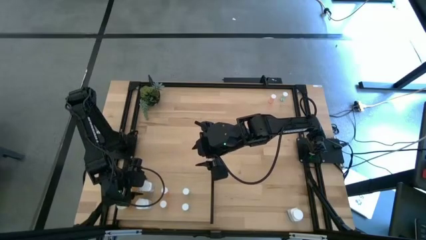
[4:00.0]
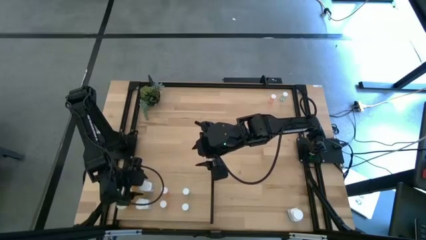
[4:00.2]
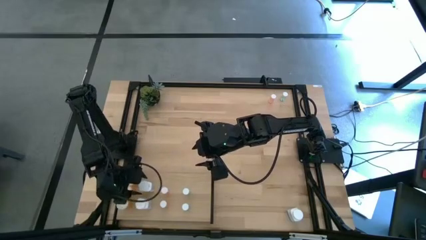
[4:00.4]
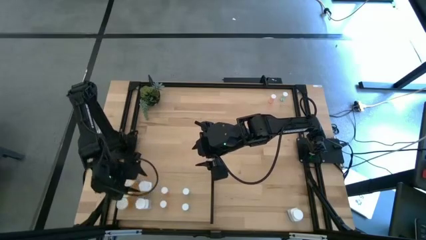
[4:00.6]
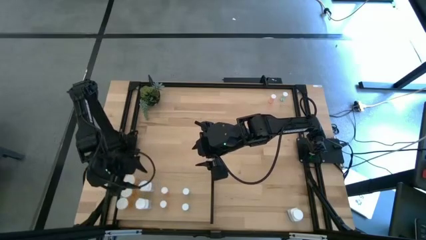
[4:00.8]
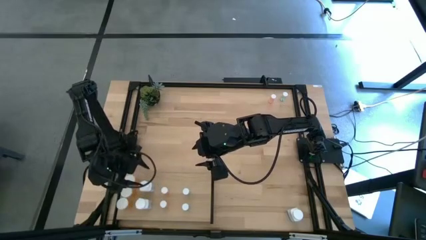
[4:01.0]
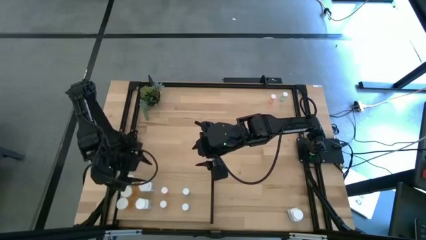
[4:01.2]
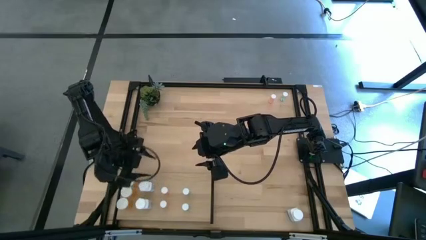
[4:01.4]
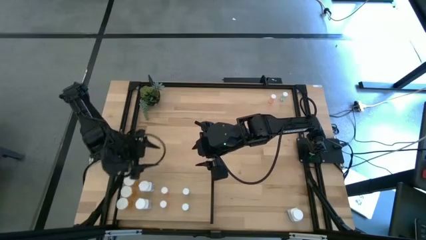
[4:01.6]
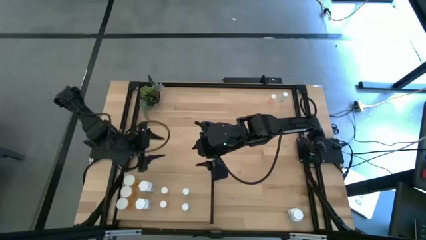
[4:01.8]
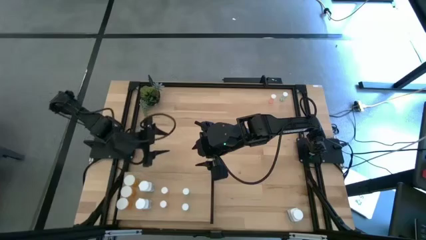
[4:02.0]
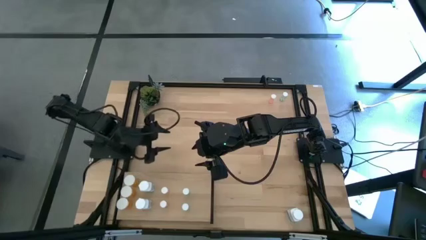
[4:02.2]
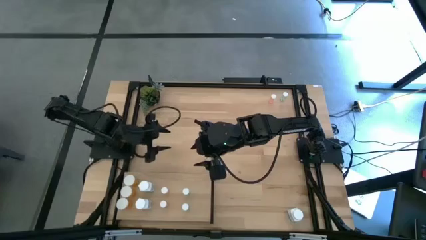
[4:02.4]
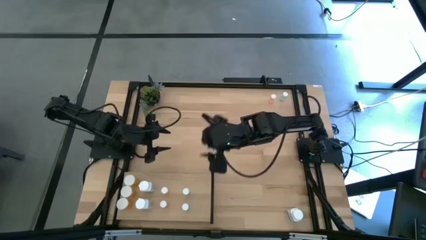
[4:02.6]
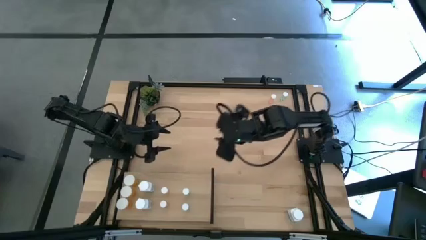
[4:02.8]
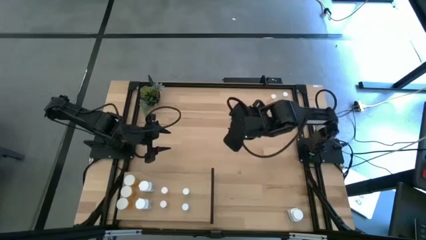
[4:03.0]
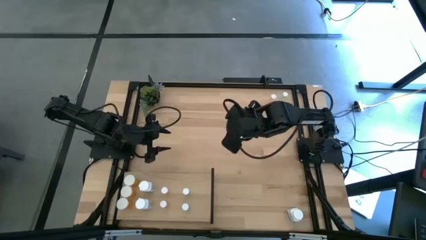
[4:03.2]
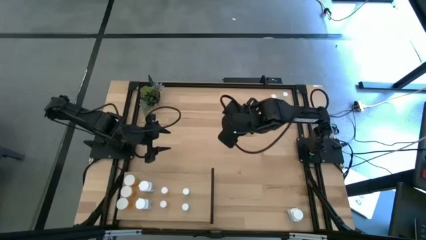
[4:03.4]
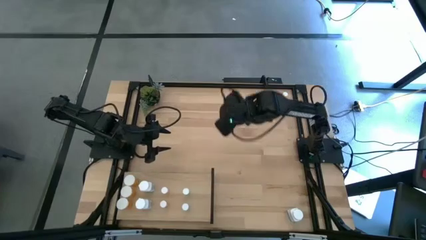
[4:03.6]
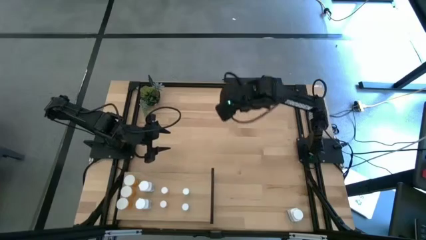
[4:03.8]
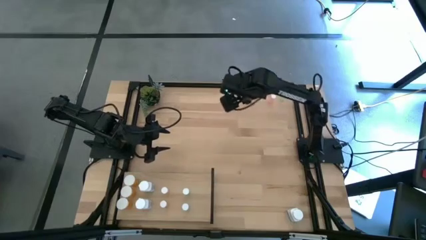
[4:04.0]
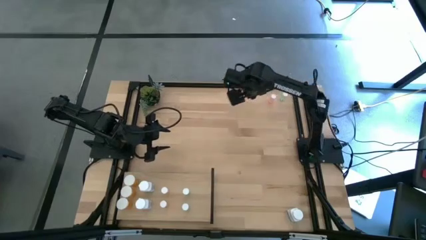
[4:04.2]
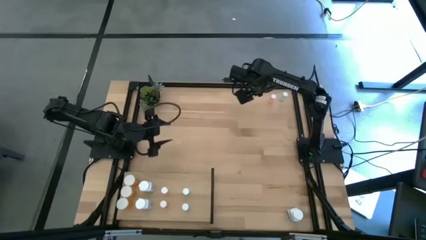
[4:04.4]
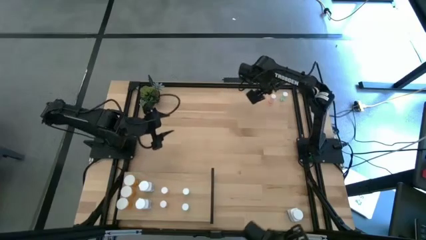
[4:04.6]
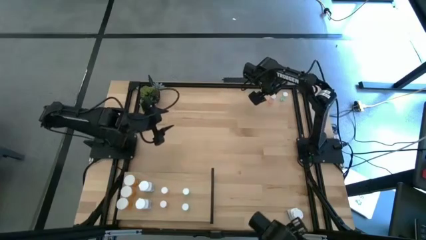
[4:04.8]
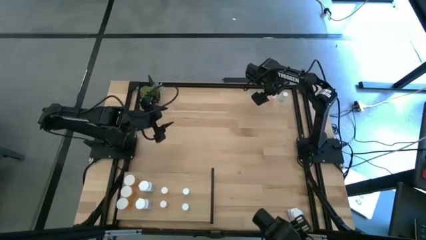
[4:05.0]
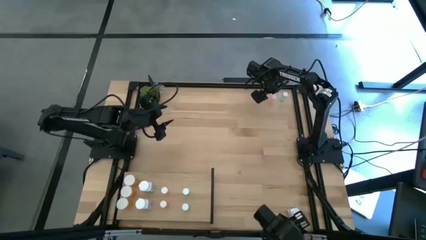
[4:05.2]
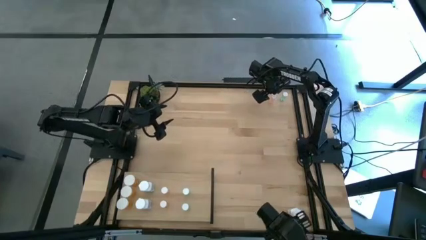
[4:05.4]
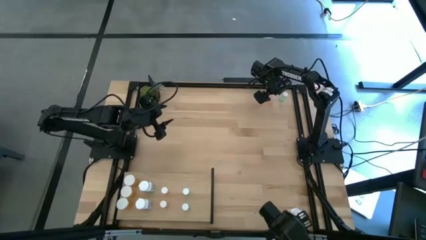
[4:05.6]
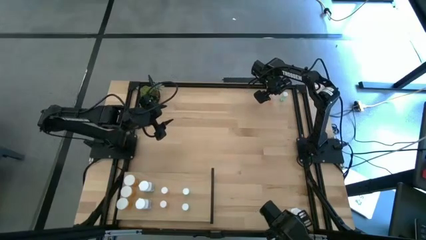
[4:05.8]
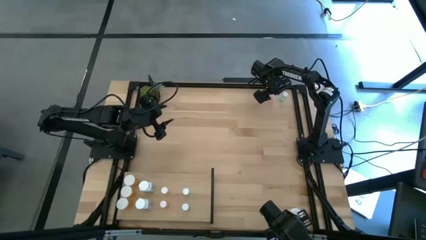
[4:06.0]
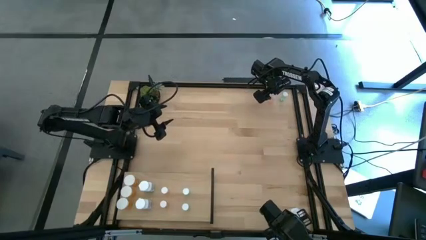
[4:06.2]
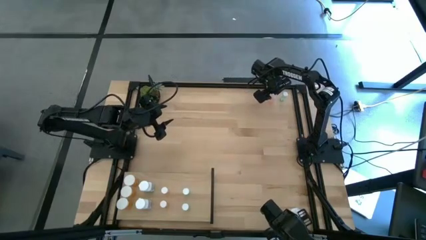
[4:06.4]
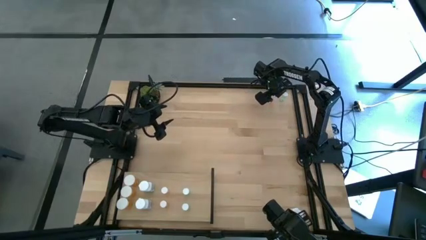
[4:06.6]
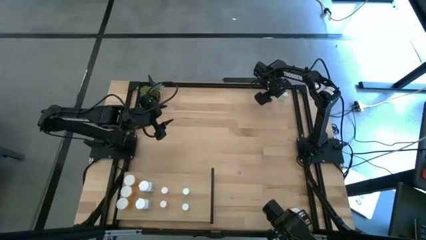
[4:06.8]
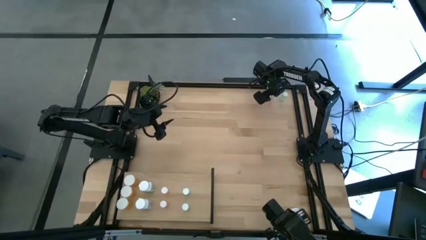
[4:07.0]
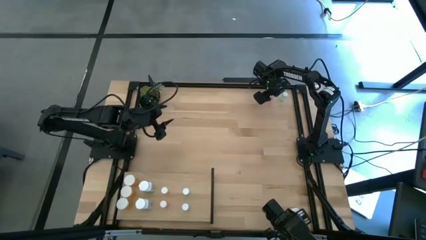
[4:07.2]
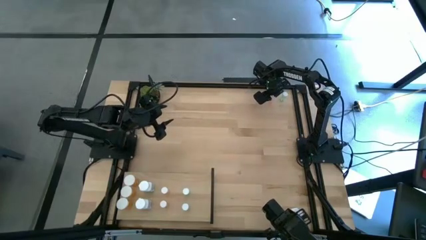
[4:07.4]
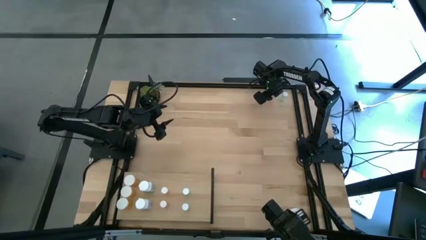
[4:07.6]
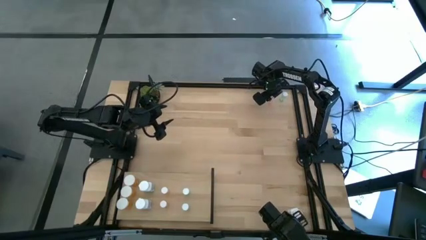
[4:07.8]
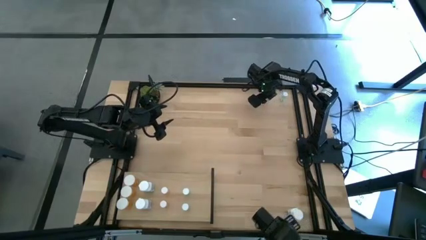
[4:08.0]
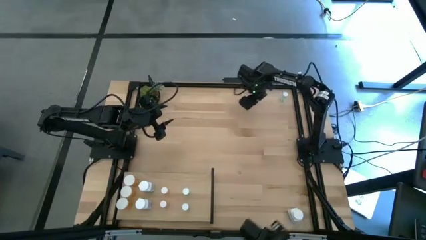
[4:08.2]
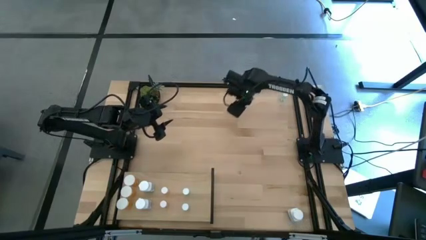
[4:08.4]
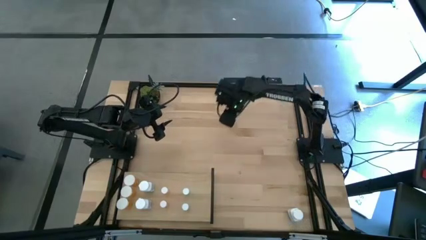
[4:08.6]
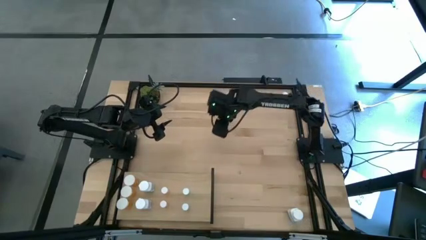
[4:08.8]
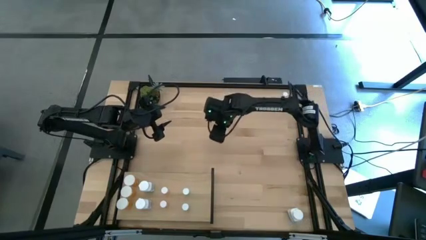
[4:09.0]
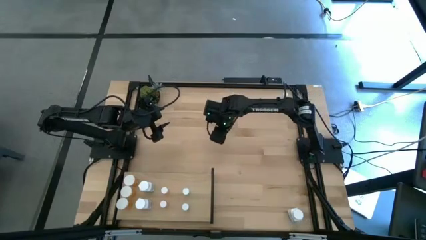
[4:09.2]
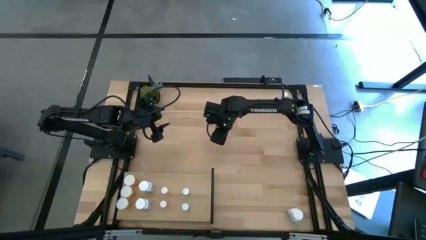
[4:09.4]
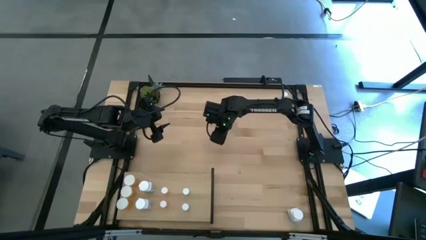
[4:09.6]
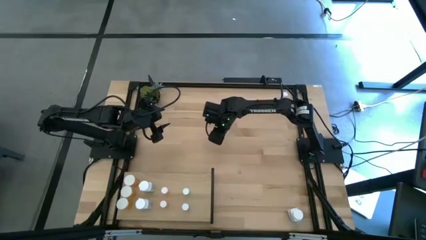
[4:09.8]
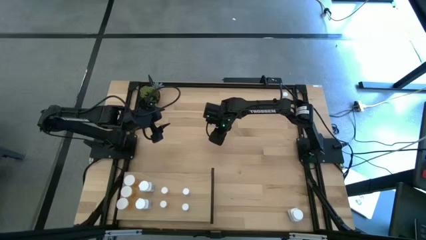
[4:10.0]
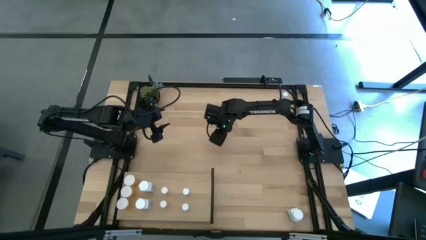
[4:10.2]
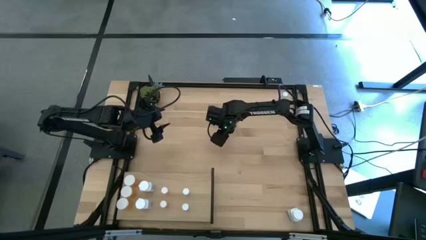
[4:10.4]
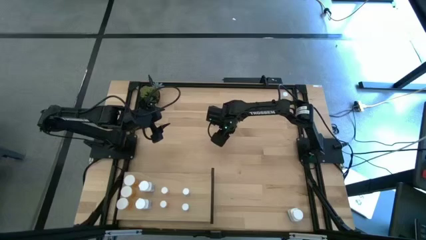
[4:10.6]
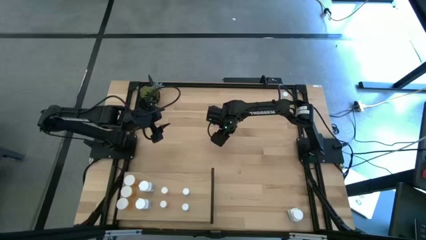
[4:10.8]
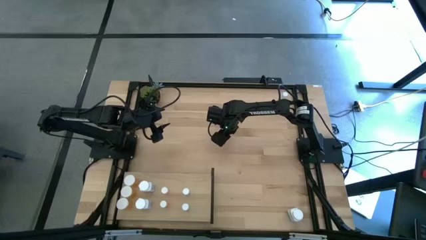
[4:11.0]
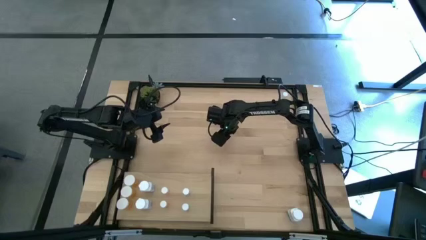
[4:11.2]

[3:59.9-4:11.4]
Task: Pick and place medicine bottles onto shelf by color
Put the small red pill bottle on the shelf aligned with the other small red pill bottles
